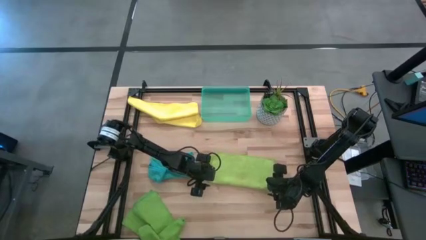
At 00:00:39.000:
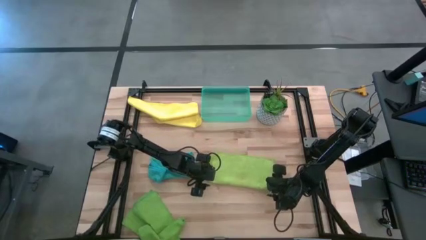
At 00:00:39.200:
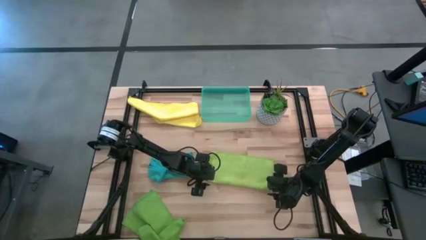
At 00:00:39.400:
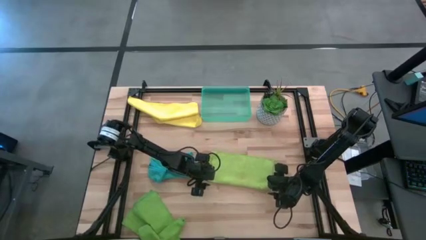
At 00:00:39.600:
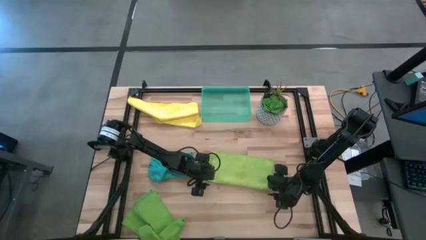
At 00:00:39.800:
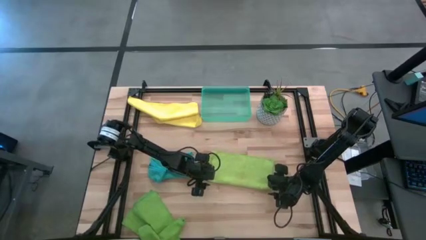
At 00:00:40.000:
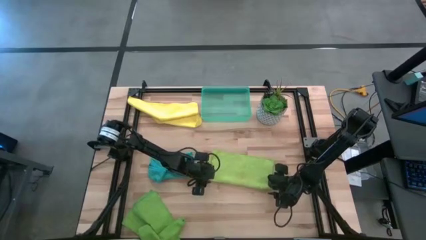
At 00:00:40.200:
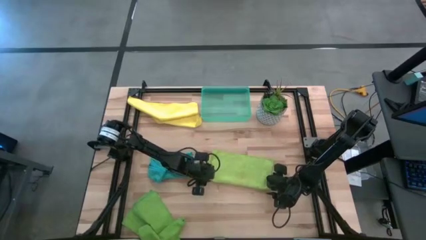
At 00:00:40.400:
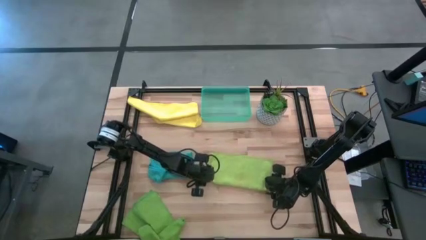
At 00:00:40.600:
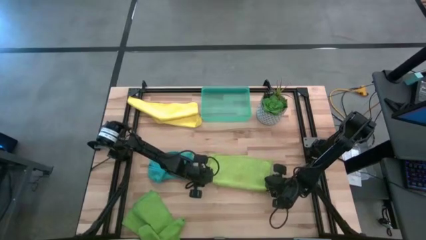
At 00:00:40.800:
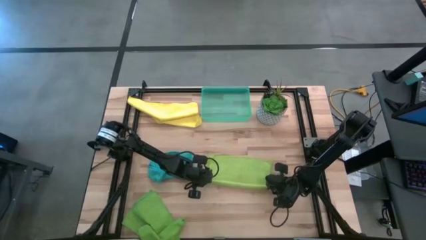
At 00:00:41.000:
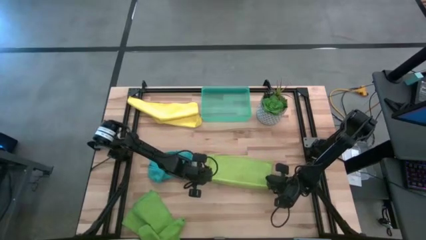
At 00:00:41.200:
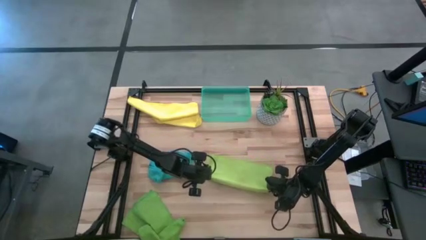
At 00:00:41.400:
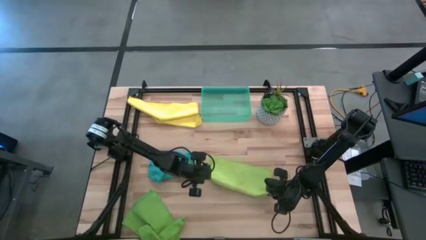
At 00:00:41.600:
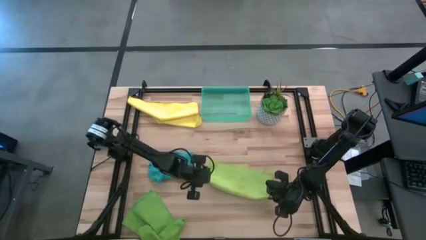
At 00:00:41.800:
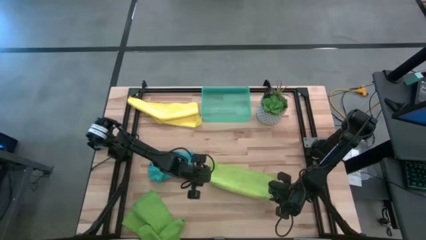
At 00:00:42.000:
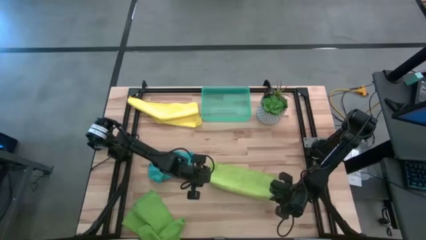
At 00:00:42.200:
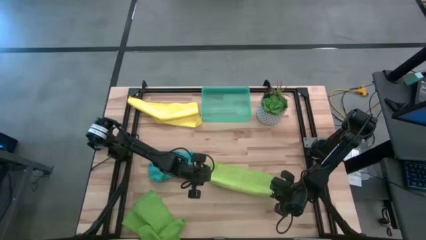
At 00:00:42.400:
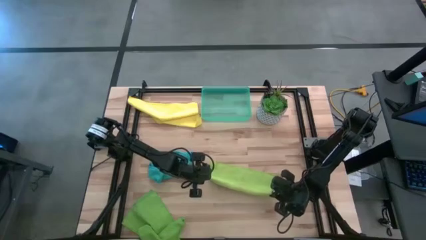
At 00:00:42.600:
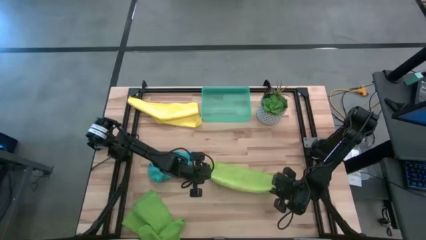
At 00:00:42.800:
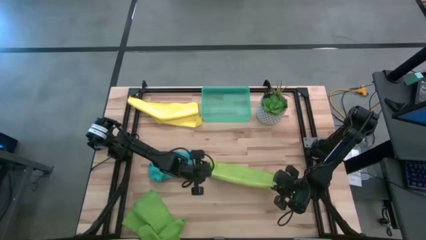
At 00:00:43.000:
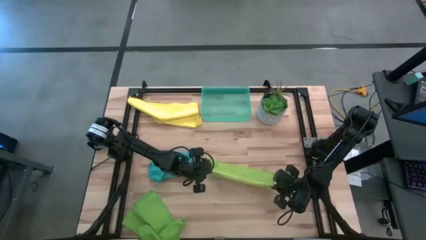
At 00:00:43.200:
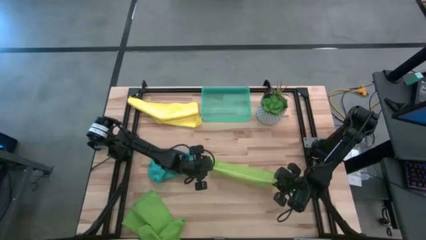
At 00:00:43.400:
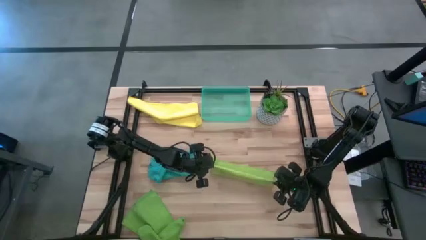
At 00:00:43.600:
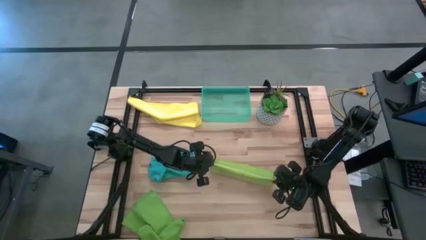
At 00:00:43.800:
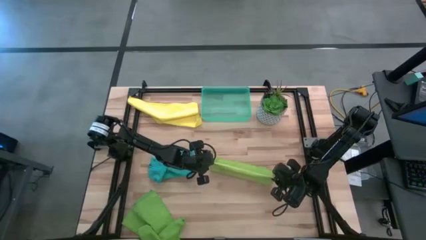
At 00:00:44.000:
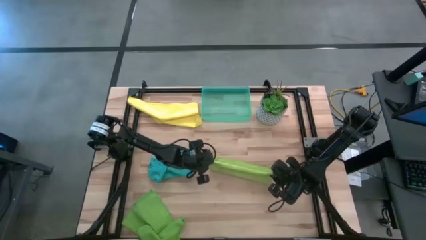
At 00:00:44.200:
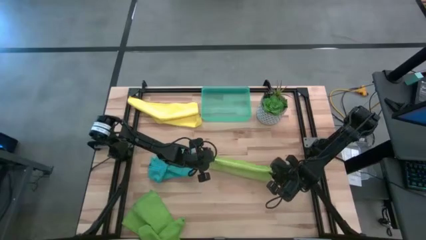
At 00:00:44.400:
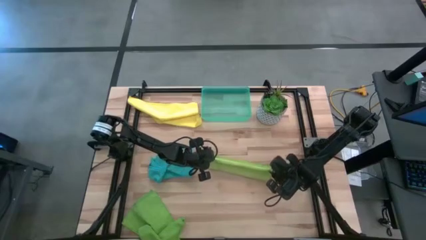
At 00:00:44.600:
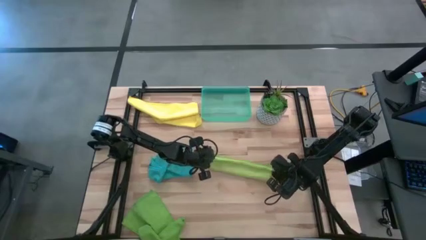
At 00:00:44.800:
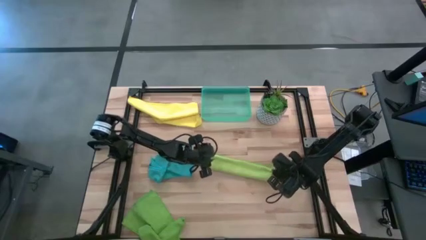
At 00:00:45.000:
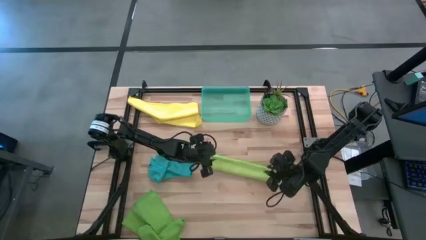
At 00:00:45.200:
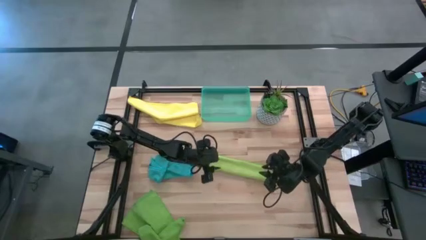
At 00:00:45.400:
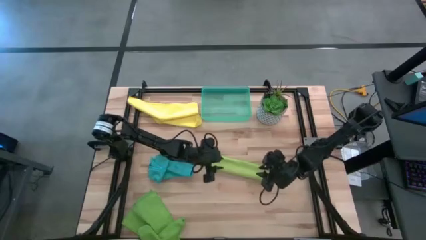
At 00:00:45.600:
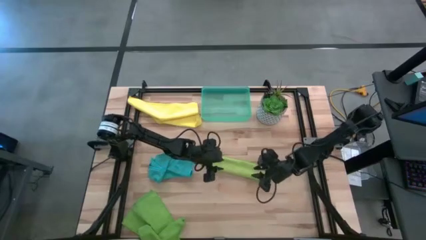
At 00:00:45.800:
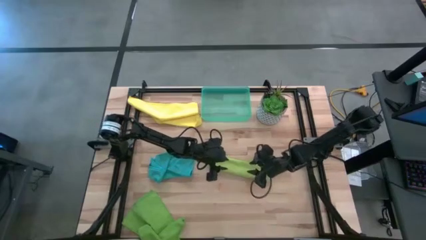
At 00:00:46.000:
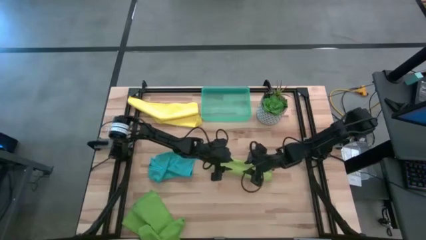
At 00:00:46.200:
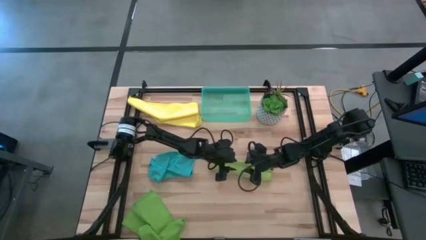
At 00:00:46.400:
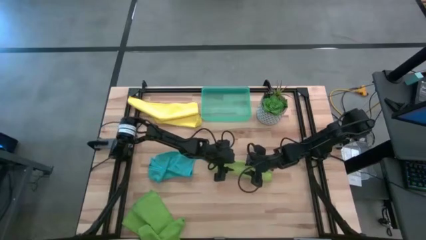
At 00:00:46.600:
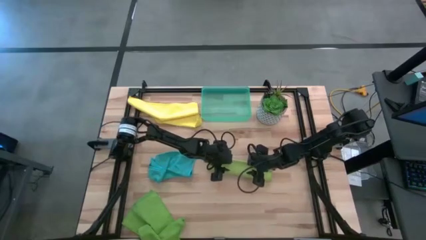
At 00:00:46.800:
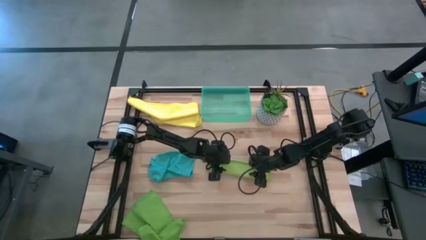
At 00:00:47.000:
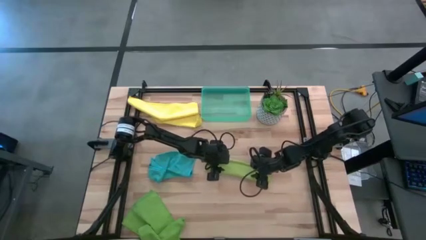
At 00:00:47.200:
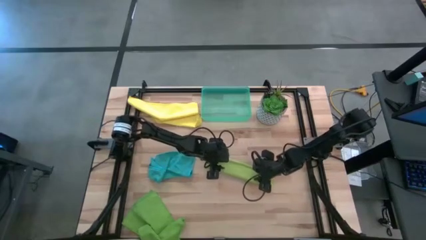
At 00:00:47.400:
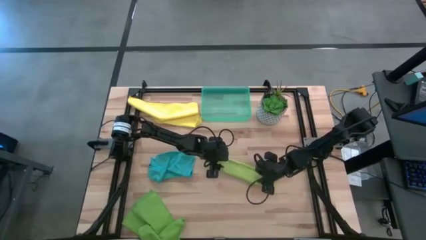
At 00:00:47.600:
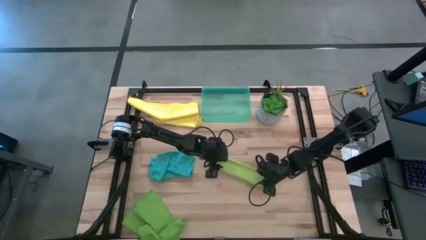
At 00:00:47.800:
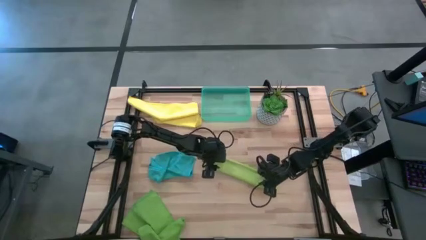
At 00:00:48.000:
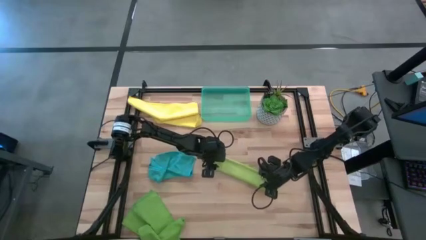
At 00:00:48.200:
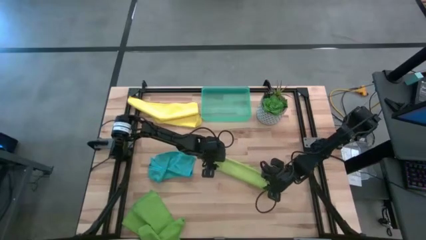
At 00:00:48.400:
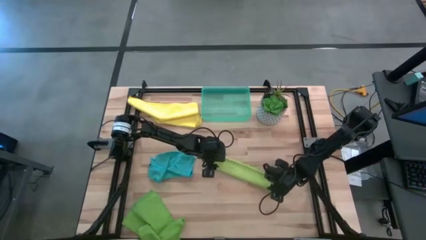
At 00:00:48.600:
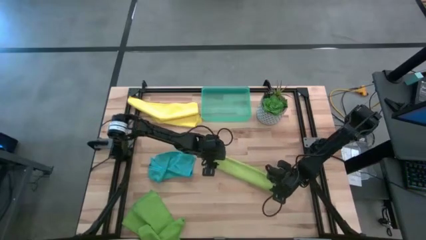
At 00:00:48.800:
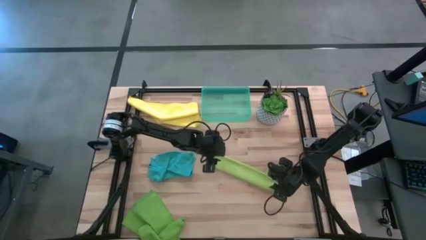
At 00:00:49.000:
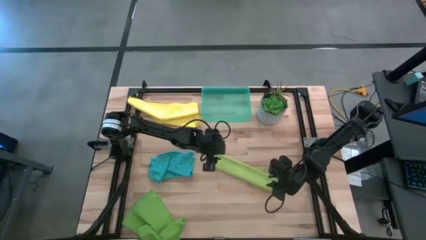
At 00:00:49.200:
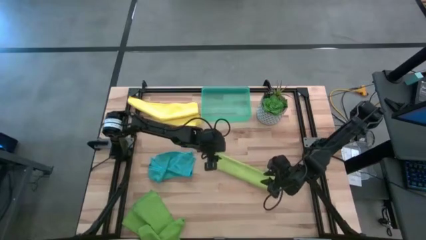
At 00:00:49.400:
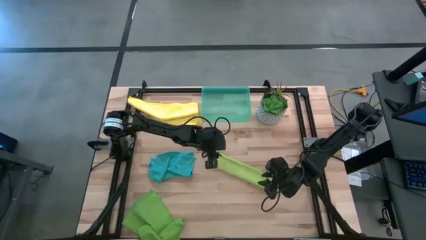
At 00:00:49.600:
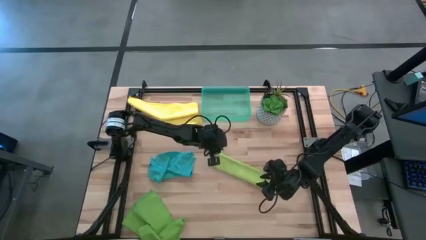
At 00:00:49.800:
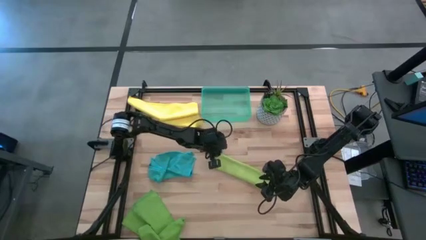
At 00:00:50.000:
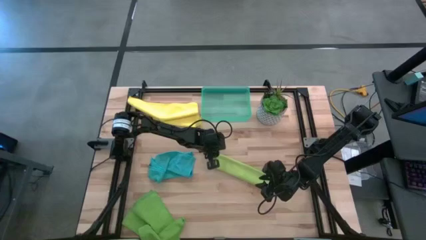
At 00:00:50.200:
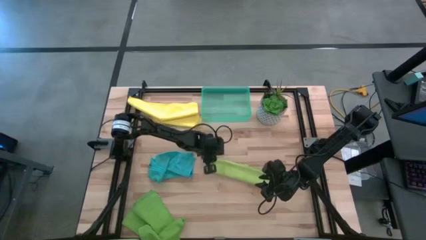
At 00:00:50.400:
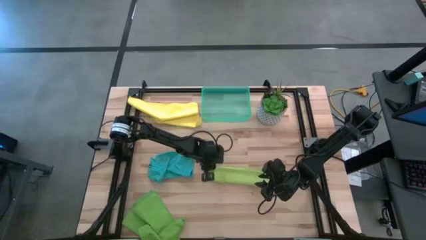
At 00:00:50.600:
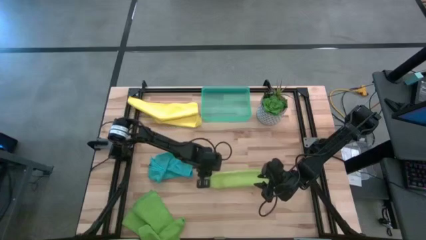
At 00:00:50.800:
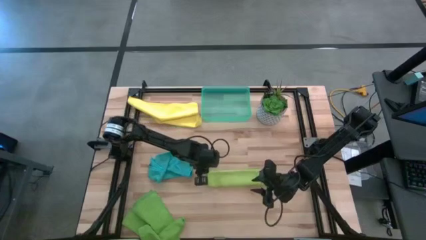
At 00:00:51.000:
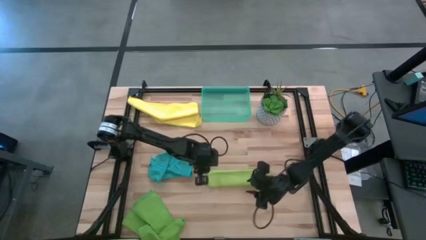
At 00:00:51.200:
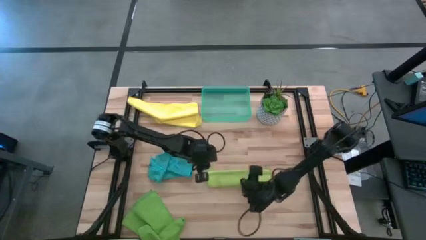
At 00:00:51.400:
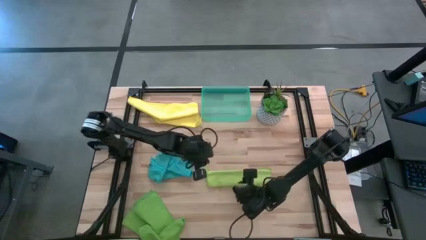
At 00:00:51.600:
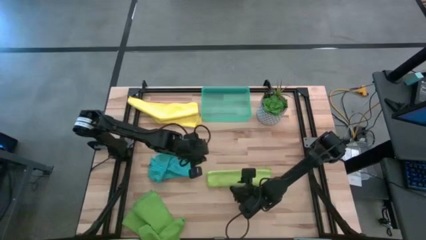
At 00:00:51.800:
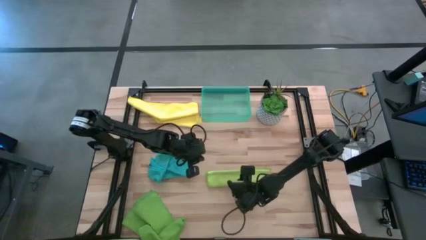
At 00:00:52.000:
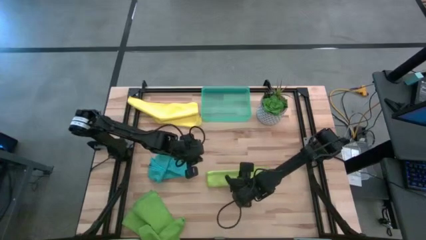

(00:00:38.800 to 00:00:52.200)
Task: Fold microfiber towels
Fold the light green microfiber cloth
